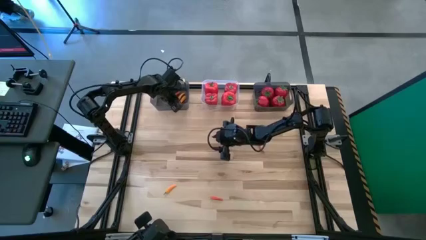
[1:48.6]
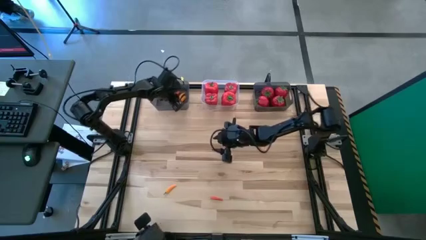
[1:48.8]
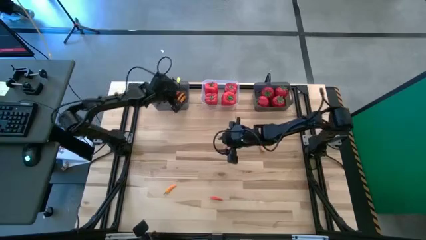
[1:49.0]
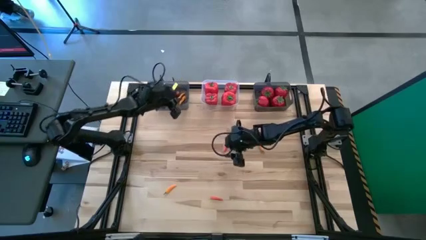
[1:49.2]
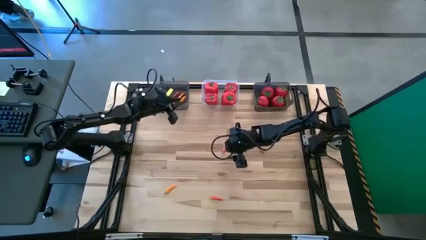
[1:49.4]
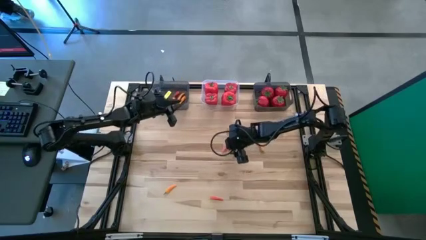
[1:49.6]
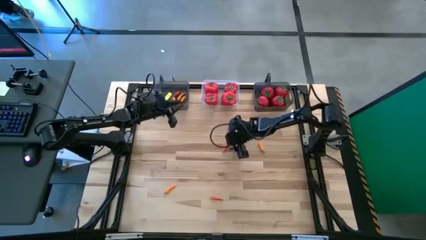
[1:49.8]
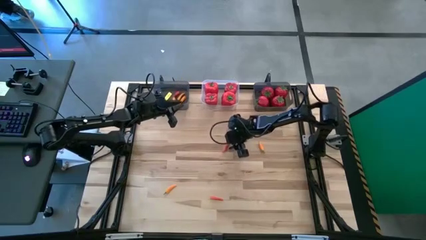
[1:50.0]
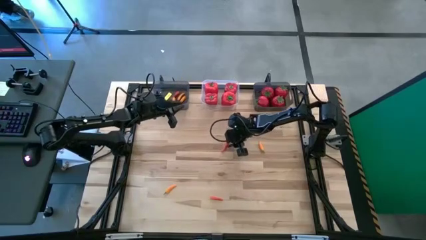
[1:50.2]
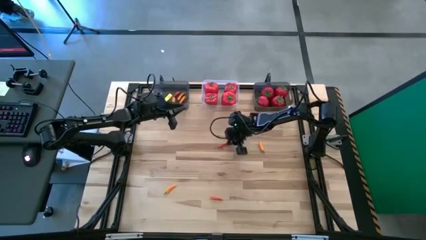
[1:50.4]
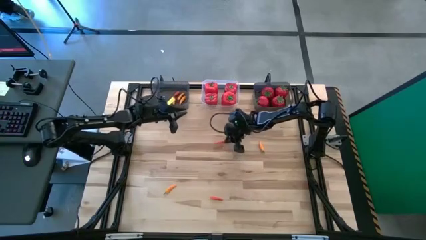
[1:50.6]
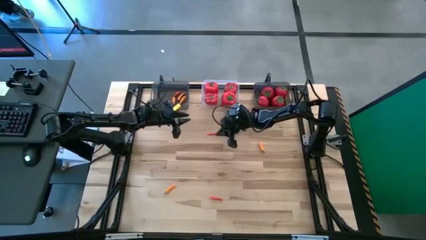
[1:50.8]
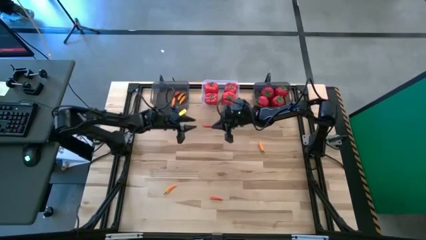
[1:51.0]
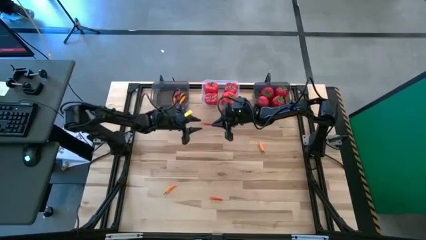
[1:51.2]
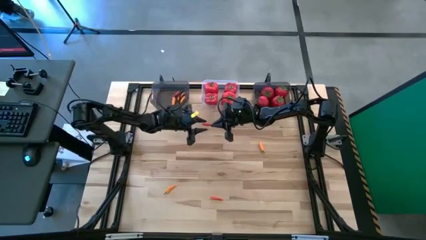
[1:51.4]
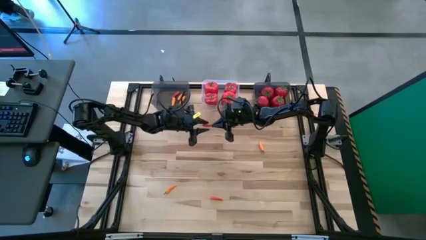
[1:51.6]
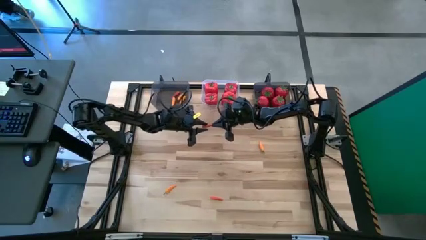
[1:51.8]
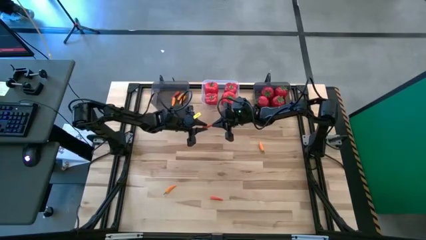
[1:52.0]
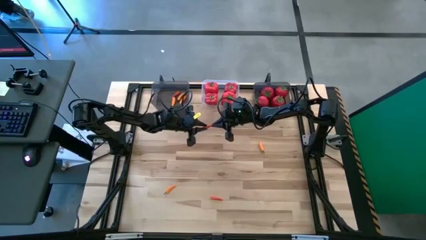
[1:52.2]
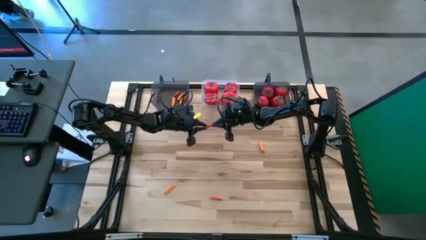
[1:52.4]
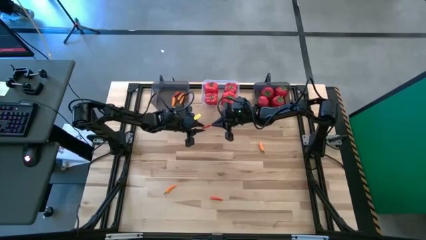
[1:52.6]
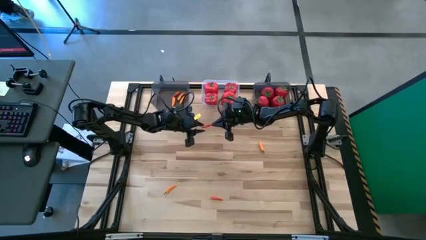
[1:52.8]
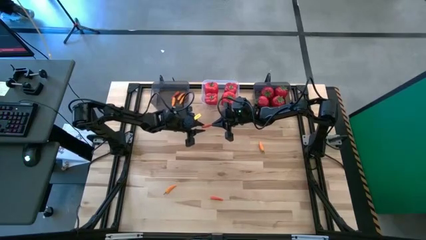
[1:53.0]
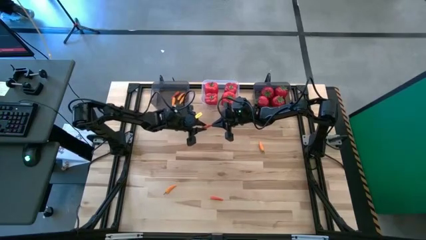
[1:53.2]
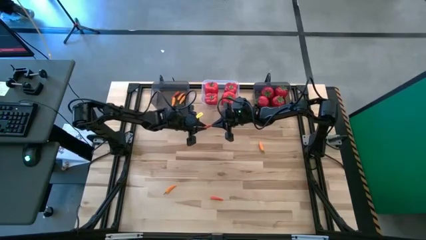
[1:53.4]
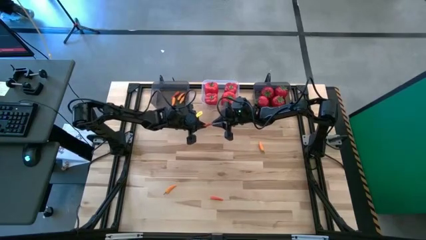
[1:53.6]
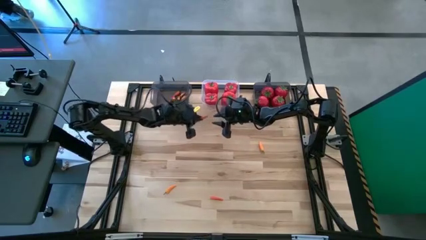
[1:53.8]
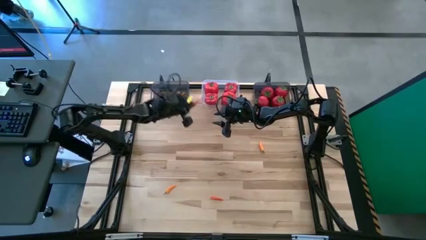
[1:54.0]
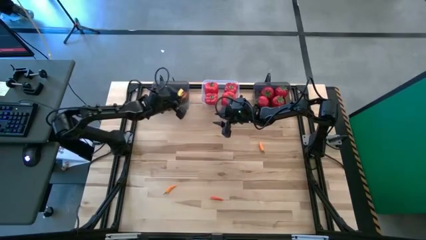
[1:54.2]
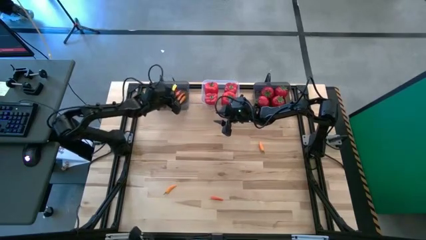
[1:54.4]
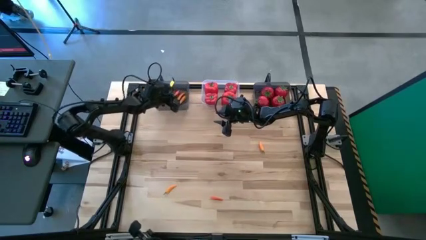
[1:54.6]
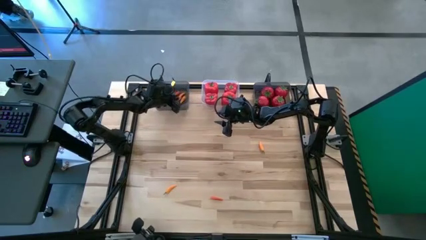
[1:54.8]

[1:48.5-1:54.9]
Task: Sort produce into baskets
Put the orange chili pepper into the left black bin

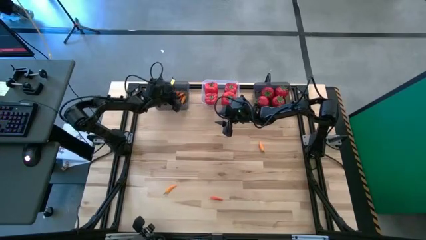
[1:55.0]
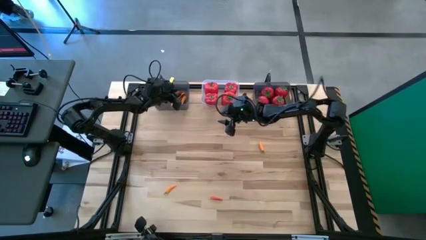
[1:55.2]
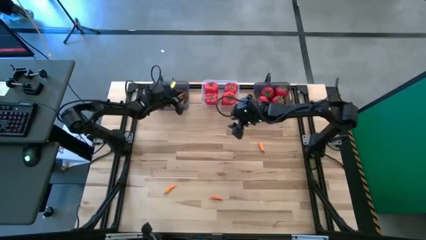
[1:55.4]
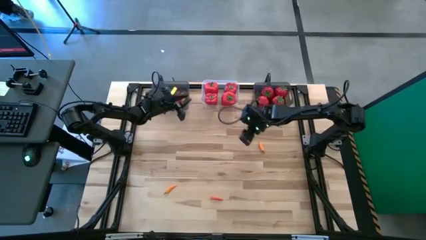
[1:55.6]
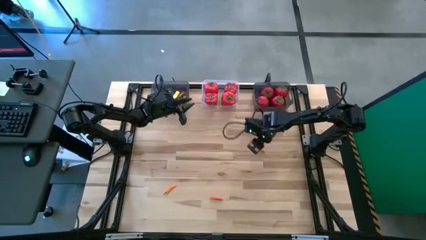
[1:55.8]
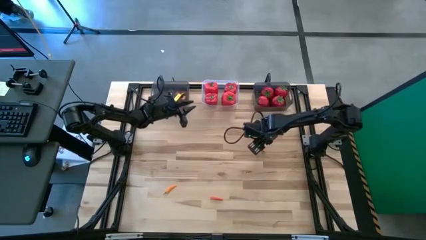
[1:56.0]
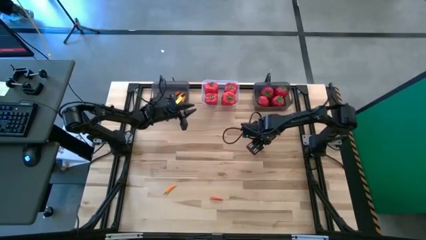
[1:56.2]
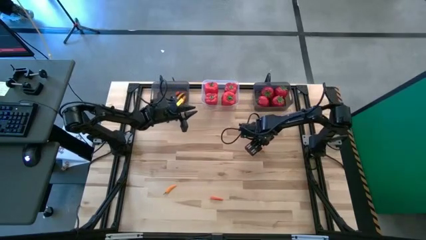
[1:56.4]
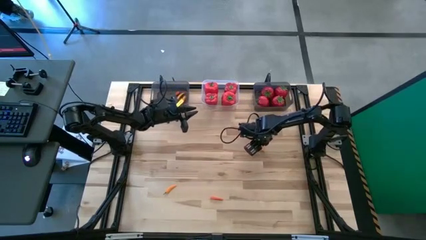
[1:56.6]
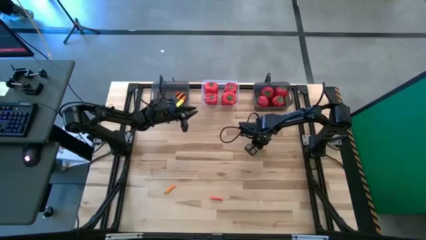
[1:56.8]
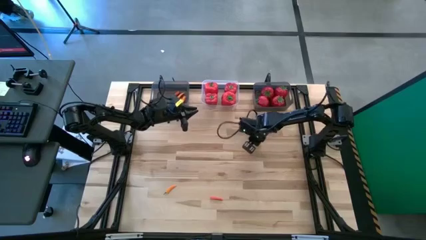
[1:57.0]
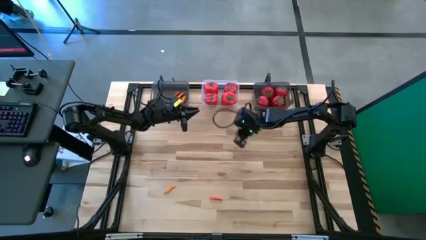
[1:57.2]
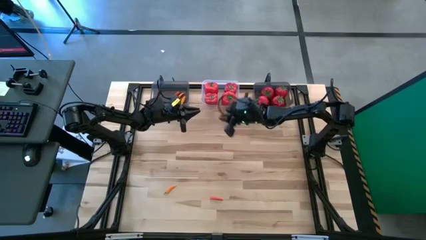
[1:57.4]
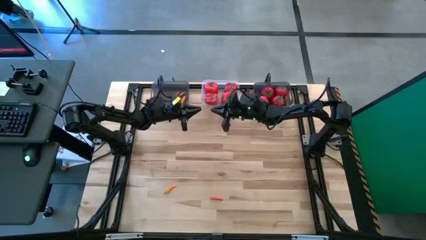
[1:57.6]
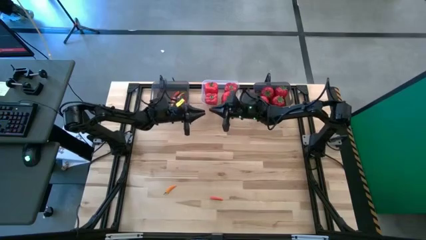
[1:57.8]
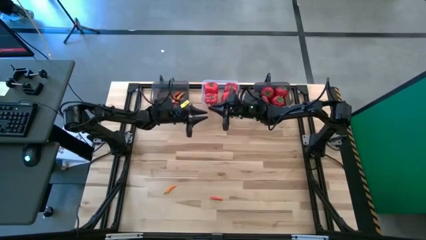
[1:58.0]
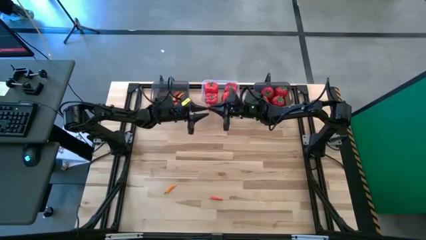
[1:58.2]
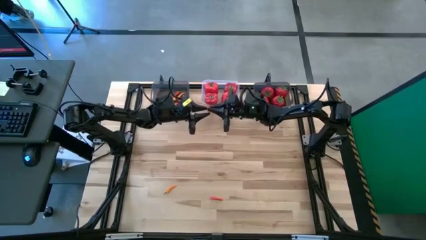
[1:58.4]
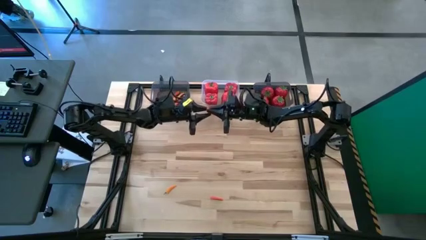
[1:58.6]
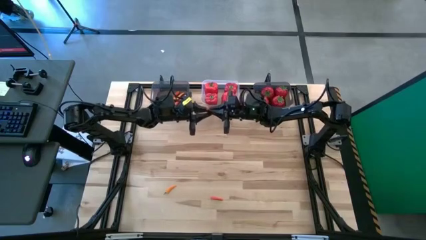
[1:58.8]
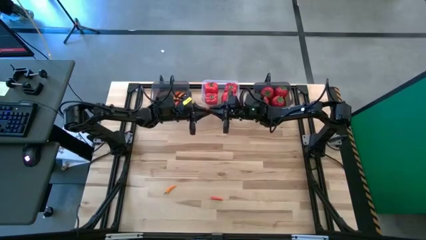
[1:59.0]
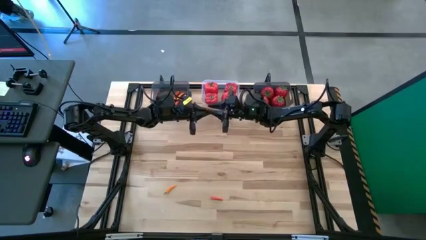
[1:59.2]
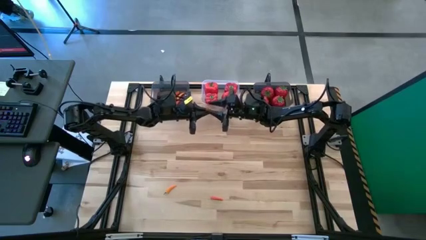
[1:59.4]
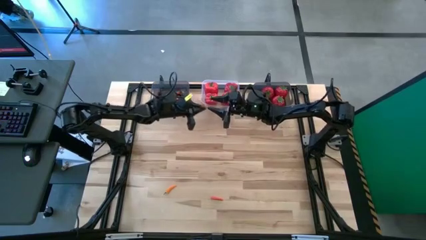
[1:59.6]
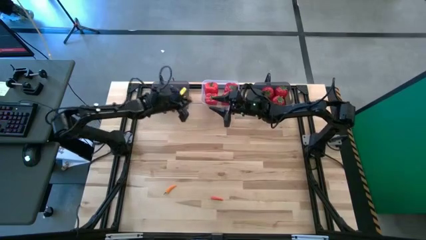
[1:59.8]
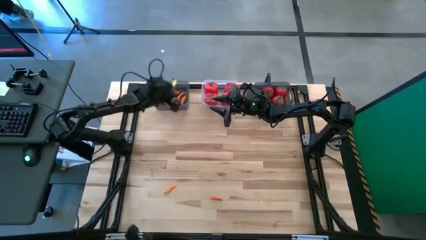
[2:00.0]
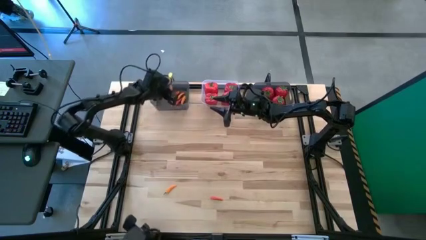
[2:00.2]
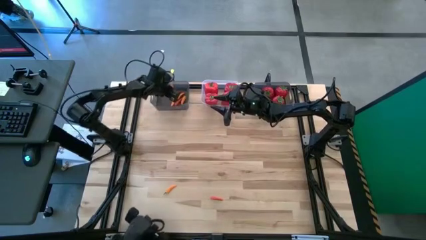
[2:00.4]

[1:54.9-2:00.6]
Put the yellow chili pepper into the left black bin
